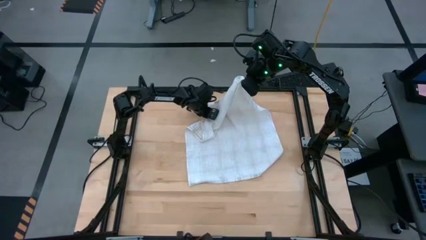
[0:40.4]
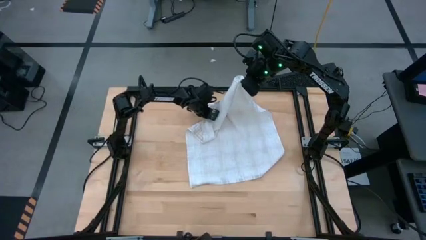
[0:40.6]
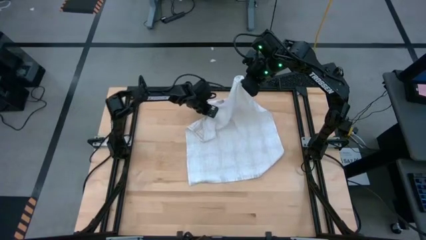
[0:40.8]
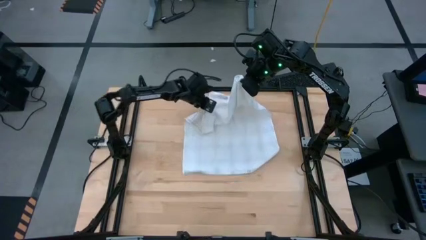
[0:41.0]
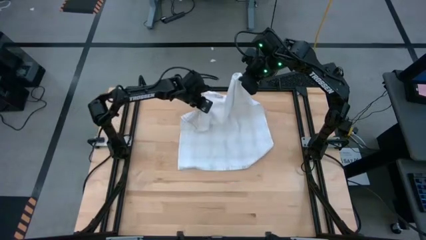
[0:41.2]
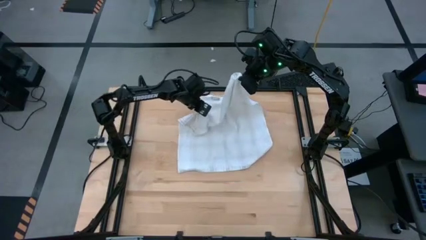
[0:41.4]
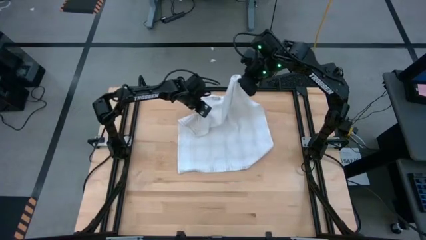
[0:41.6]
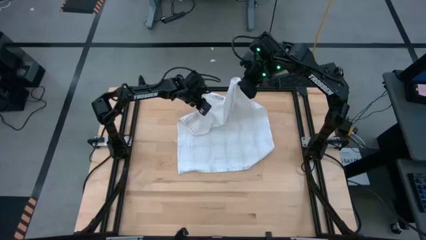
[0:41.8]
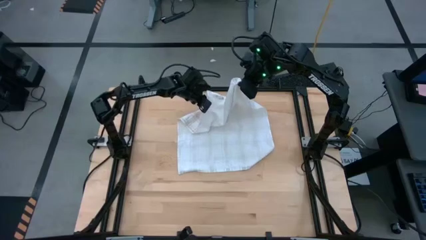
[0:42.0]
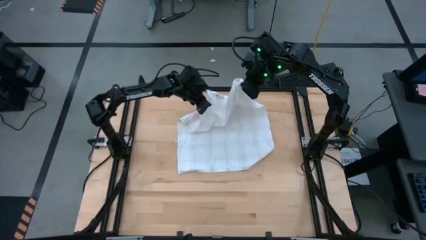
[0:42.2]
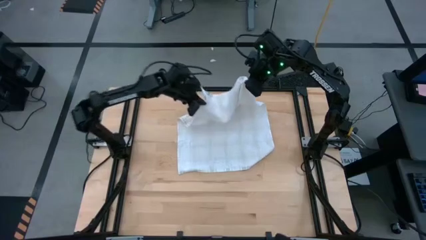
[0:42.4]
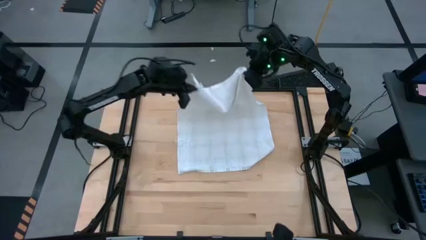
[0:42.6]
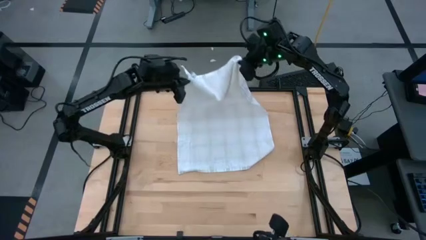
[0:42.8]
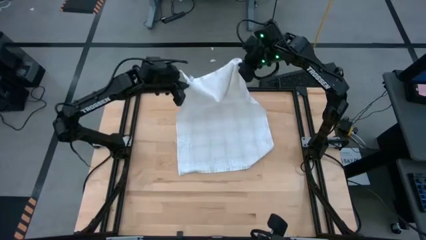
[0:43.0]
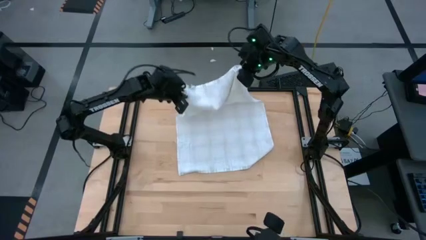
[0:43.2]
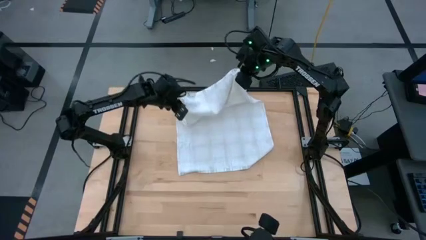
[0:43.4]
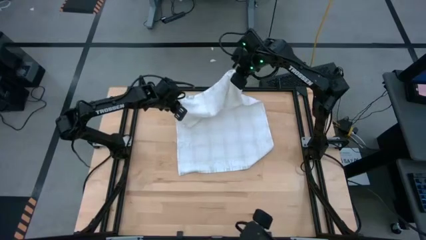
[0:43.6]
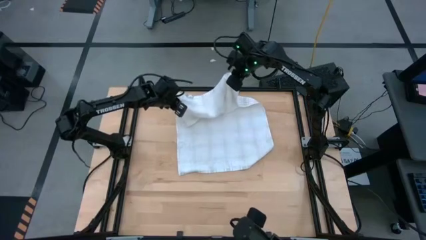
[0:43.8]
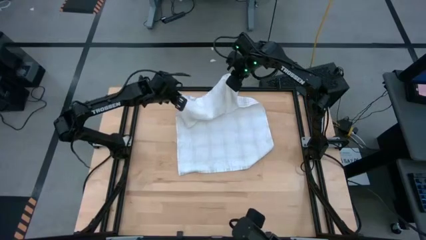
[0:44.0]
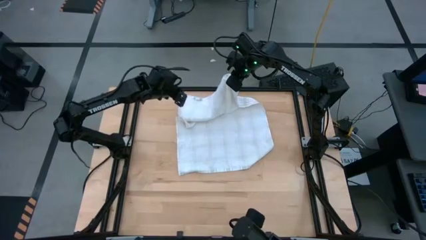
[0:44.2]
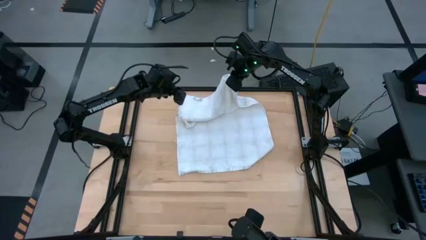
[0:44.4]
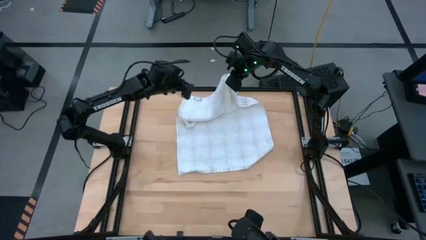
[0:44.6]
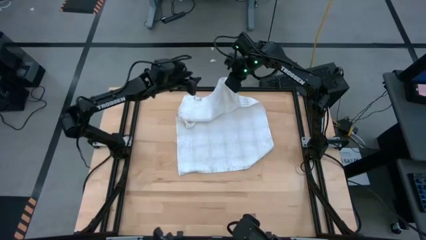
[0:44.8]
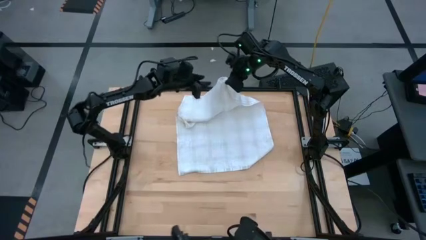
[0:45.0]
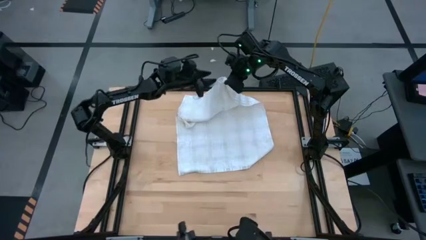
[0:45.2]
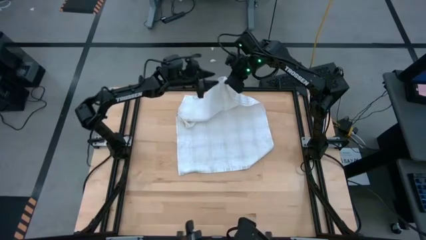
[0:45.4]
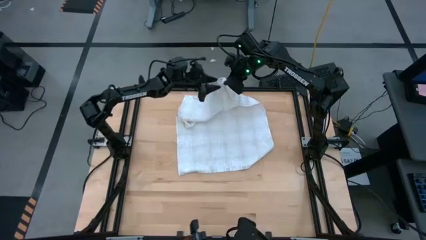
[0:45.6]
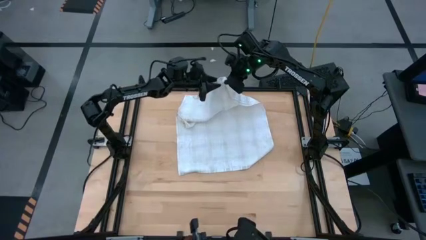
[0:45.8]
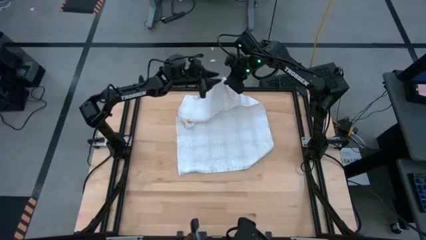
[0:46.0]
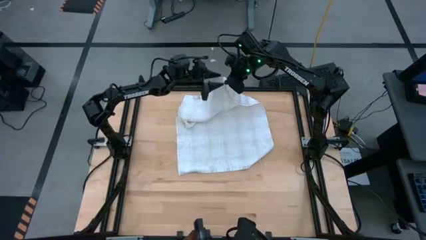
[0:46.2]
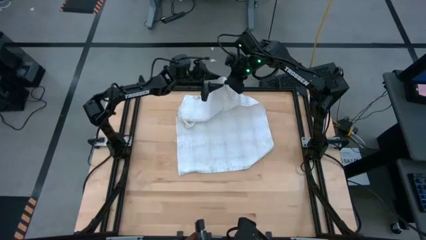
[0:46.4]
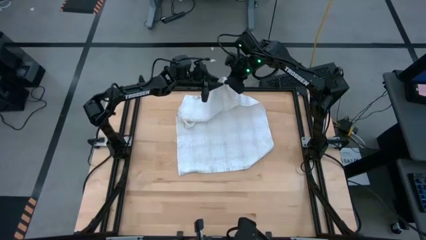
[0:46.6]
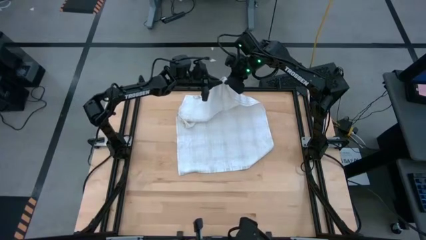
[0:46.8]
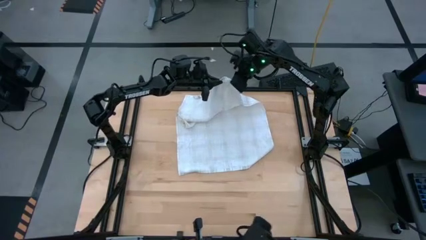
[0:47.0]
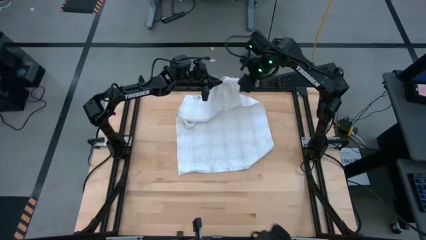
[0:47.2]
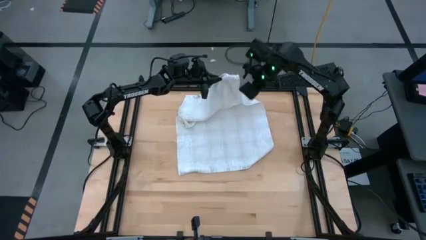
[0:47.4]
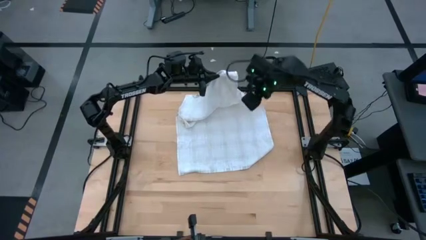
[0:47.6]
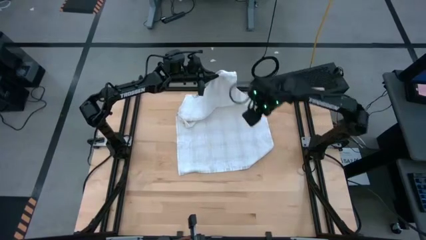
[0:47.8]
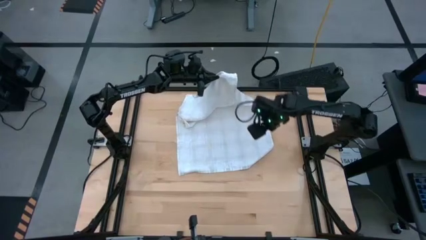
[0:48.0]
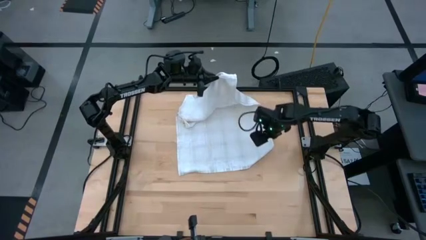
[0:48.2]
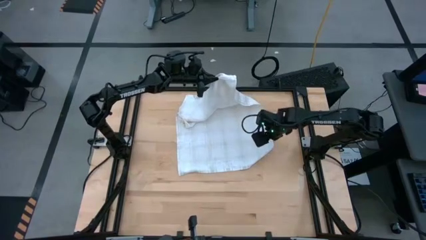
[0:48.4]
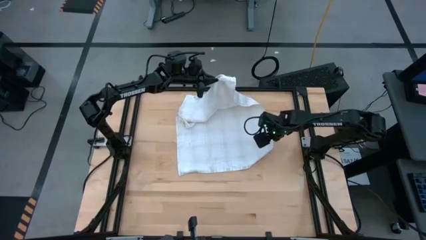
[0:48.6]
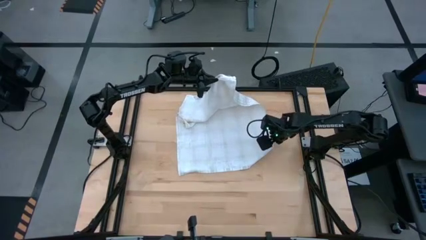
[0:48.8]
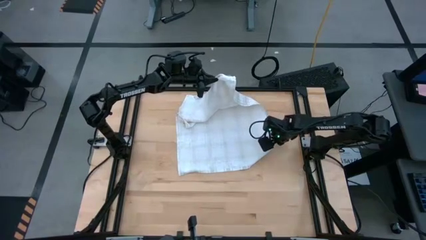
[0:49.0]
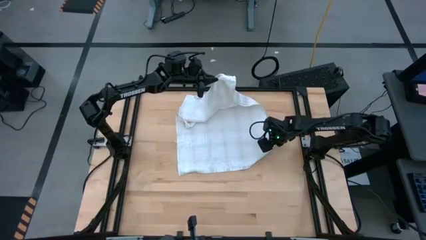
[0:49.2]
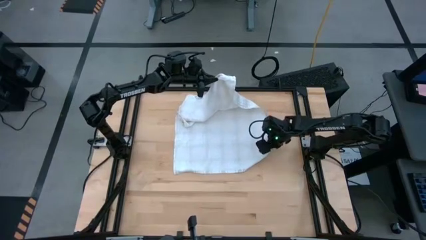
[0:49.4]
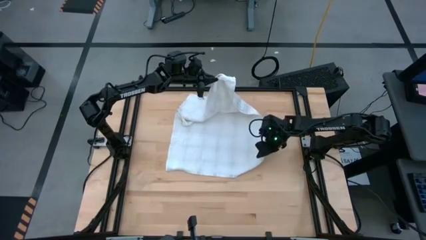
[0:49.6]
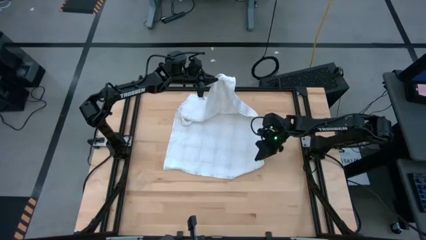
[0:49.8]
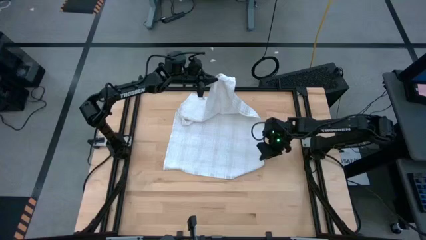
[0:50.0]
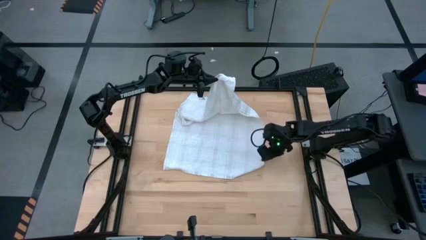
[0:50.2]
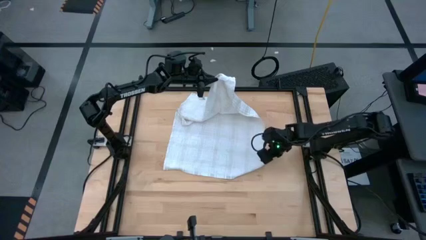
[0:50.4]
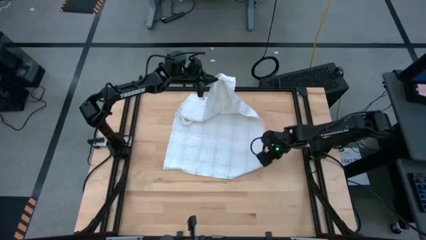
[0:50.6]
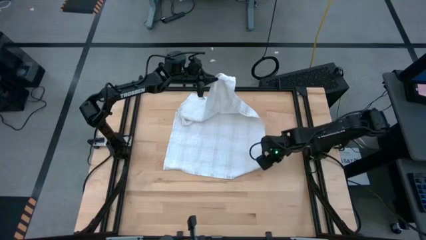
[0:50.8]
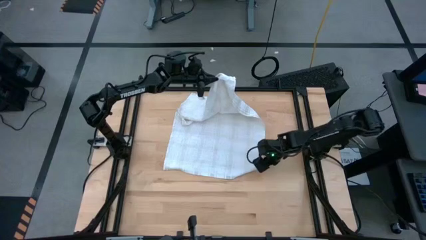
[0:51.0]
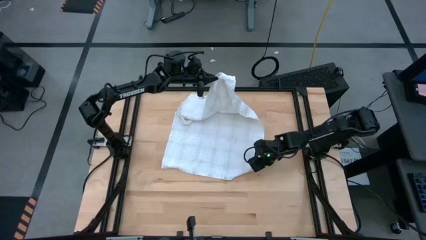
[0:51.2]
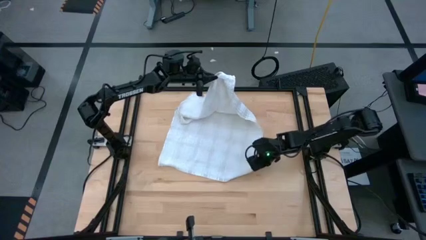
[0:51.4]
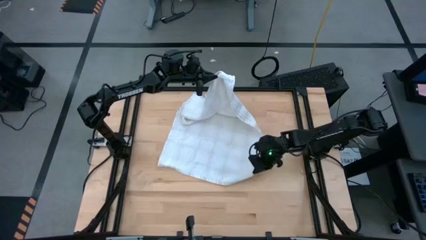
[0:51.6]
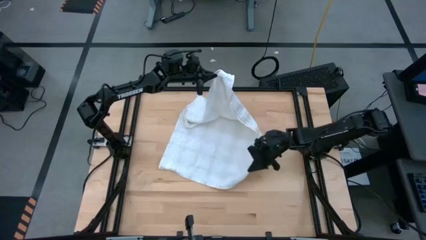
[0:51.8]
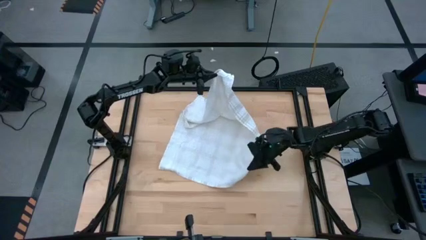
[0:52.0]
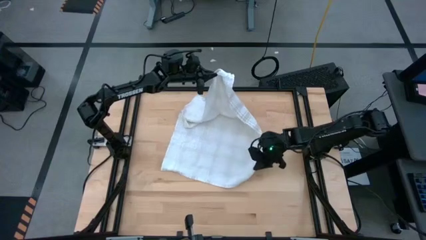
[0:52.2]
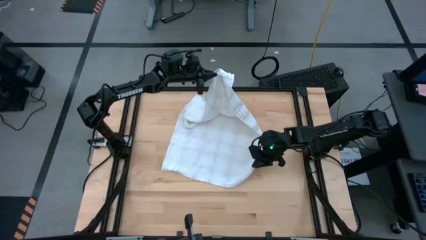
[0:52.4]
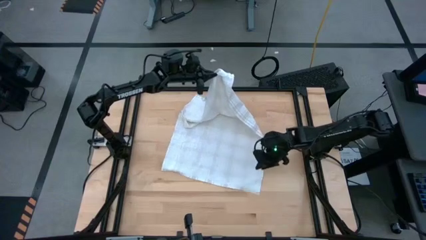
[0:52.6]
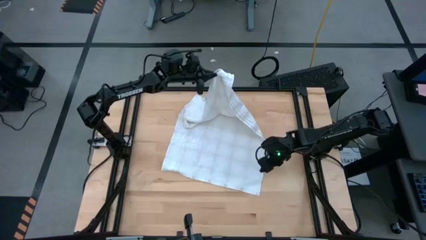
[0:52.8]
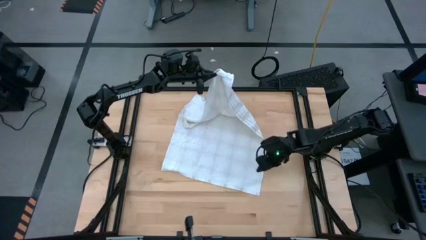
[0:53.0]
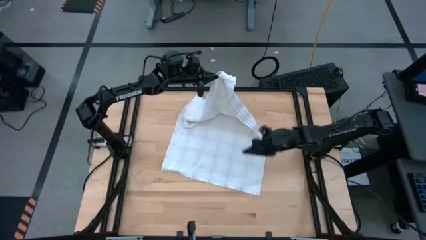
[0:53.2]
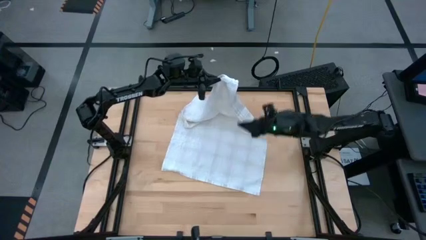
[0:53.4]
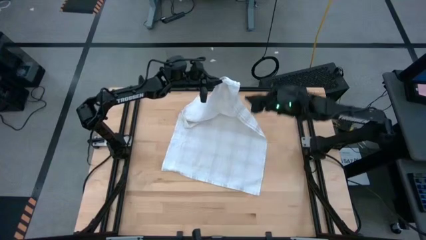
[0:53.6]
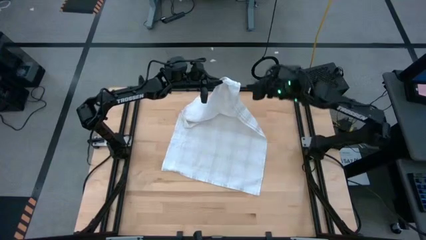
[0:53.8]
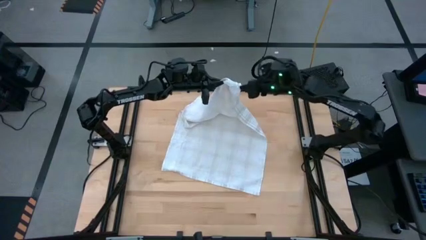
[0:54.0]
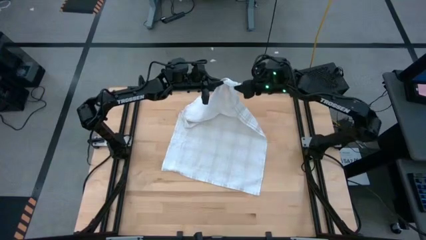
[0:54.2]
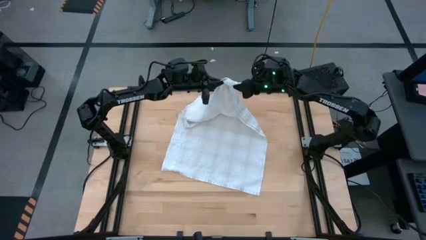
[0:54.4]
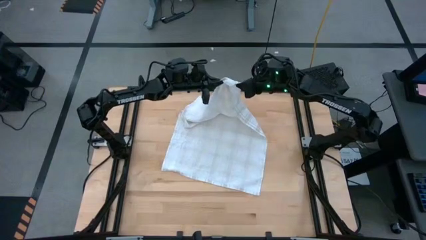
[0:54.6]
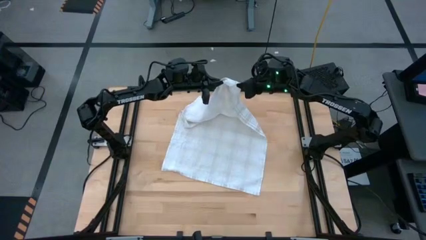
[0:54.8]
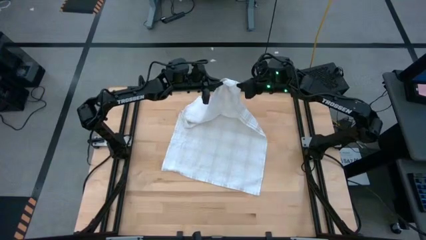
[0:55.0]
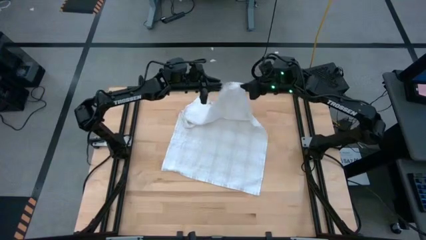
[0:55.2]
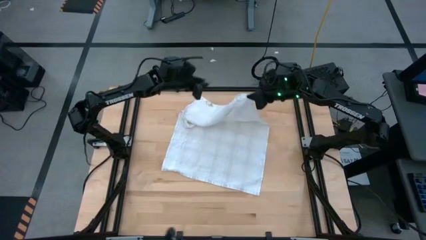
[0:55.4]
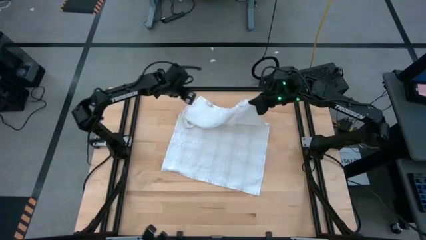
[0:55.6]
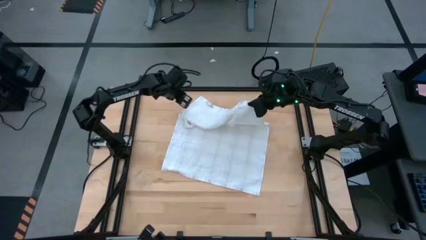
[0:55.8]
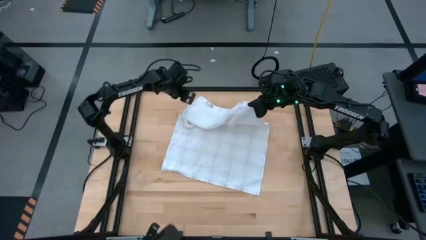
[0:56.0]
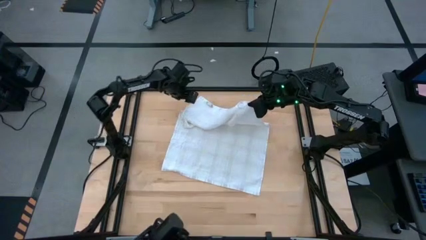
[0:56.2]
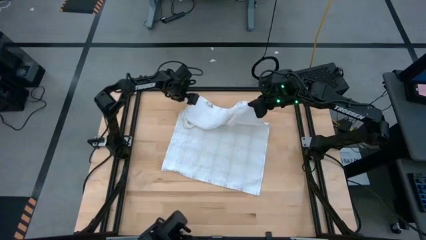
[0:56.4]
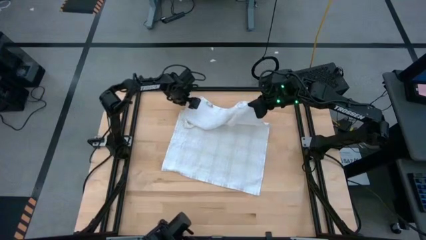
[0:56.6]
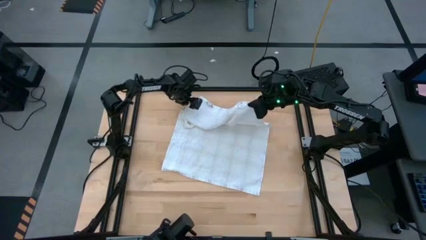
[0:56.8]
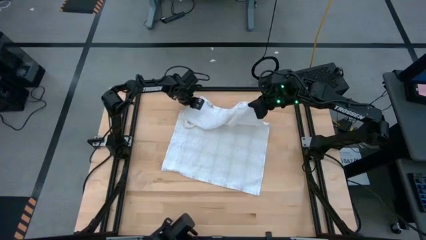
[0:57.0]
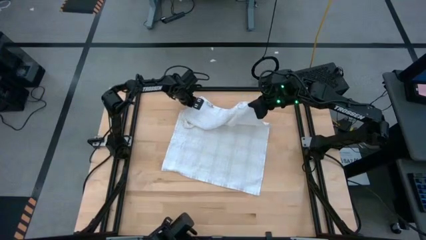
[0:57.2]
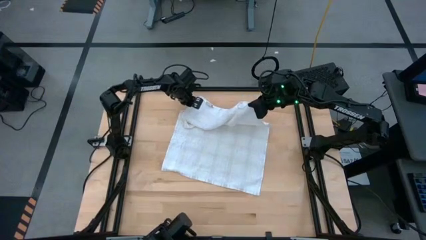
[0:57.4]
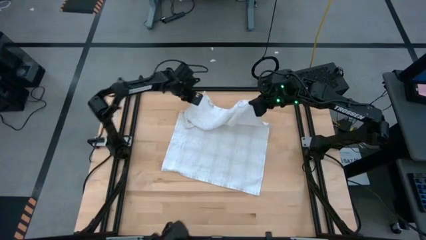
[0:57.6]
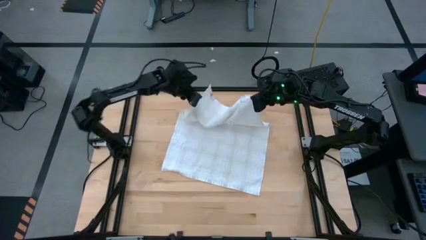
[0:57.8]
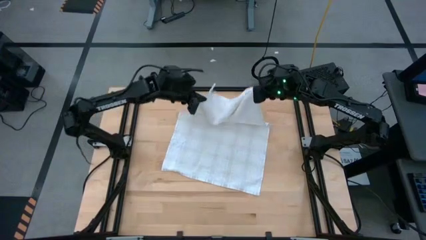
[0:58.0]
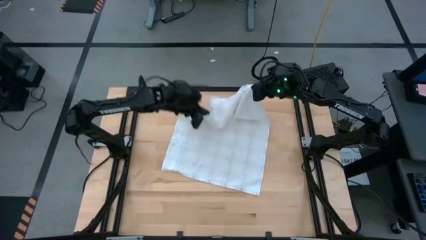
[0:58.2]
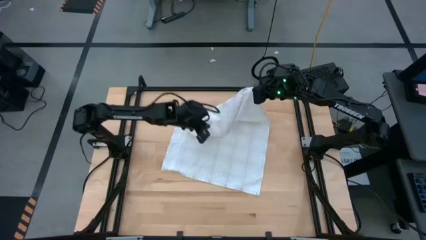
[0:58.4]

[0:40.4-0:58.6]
Task: Roll towel into tight, uniform cylinder
Roll the white towel
